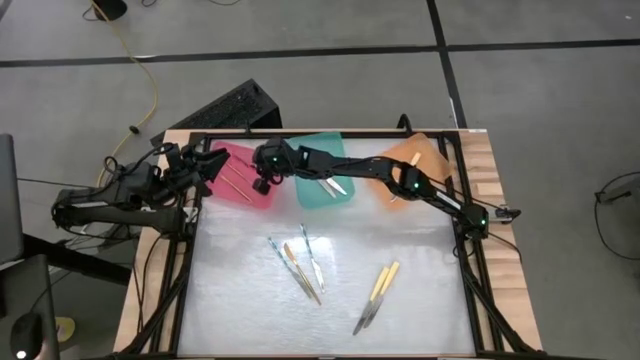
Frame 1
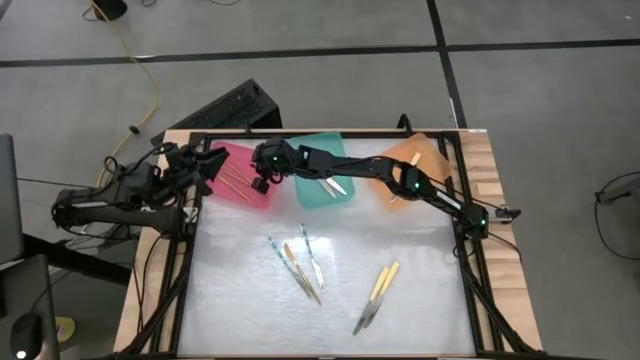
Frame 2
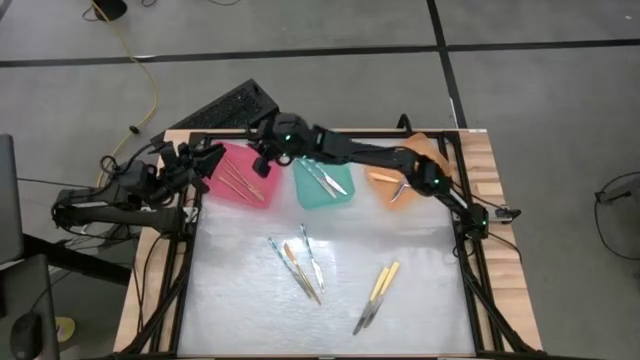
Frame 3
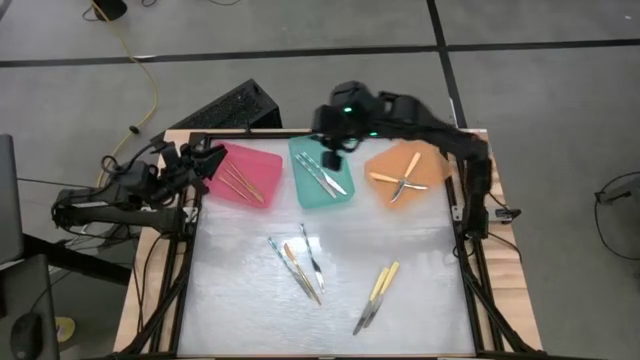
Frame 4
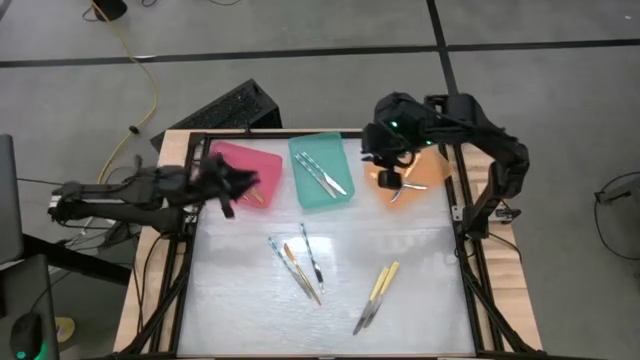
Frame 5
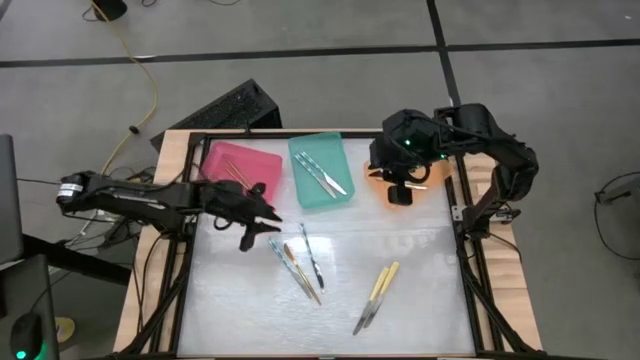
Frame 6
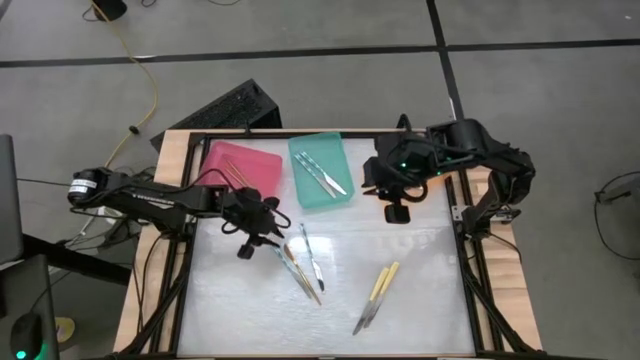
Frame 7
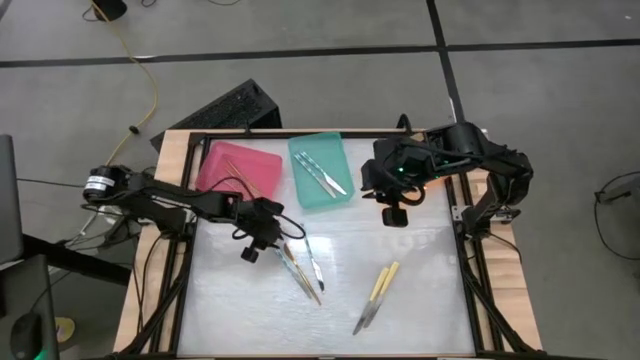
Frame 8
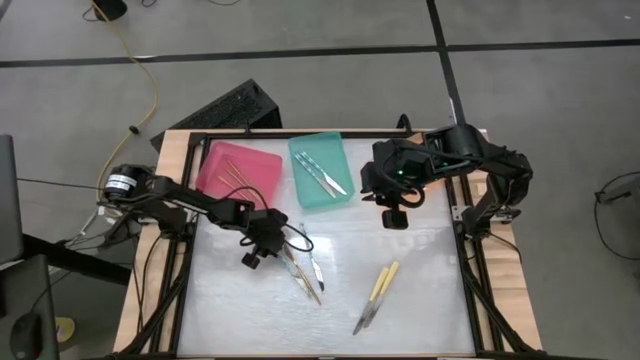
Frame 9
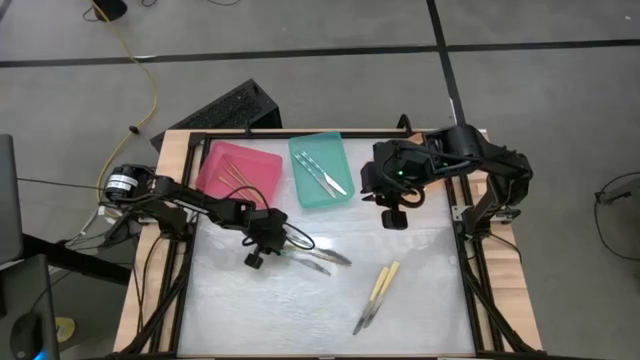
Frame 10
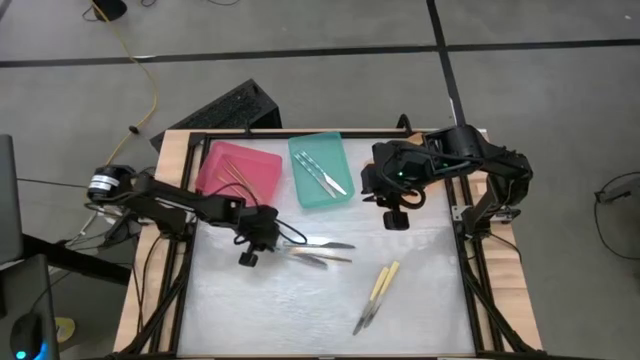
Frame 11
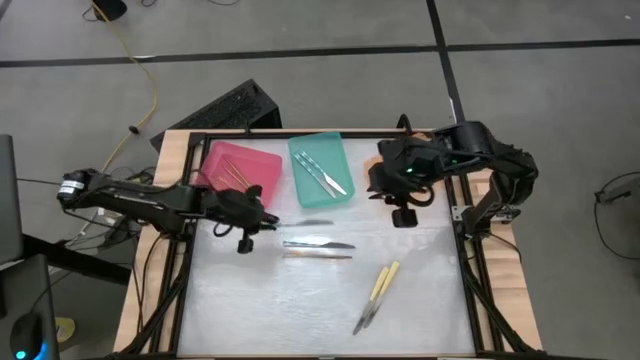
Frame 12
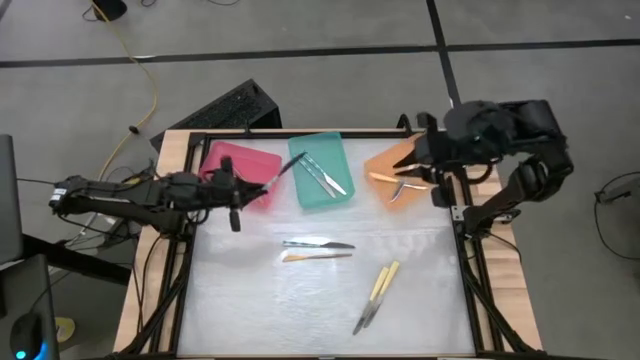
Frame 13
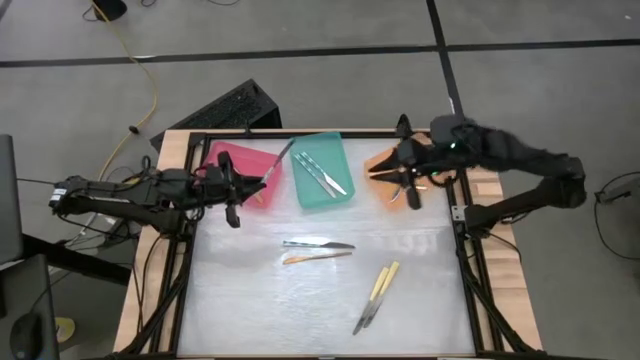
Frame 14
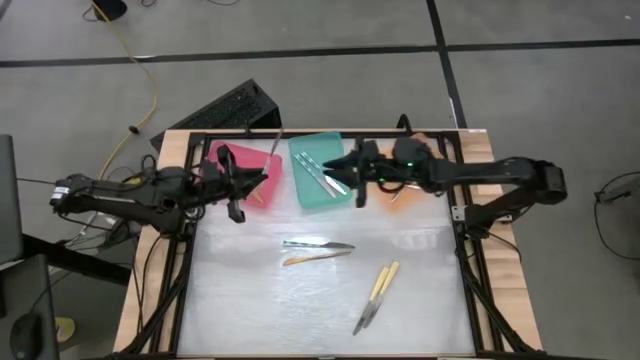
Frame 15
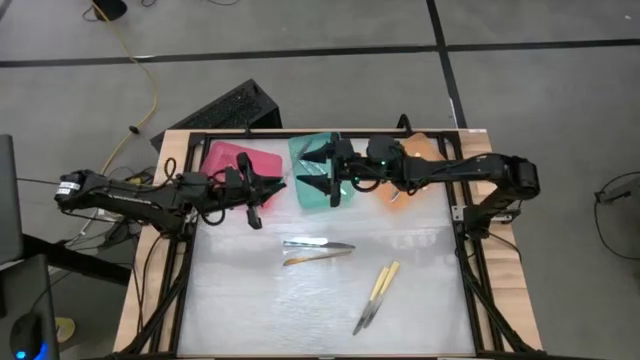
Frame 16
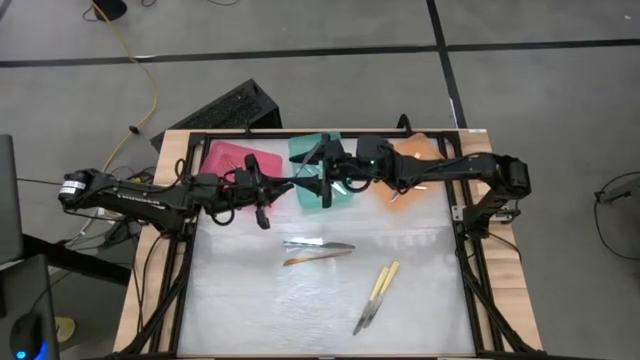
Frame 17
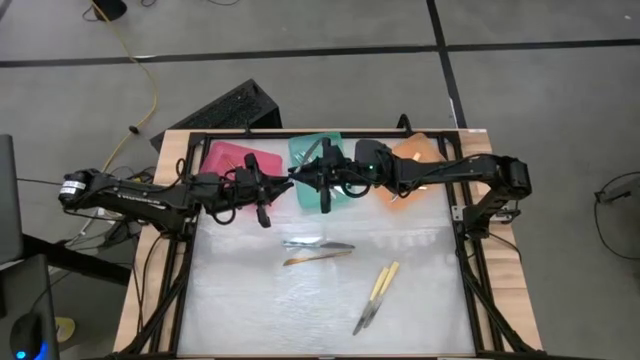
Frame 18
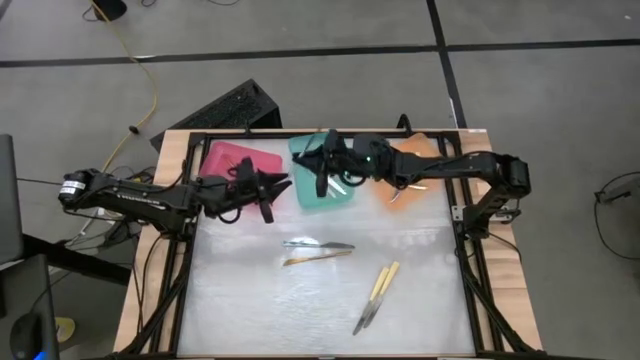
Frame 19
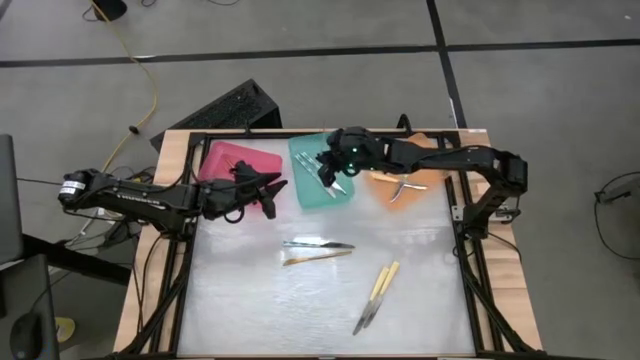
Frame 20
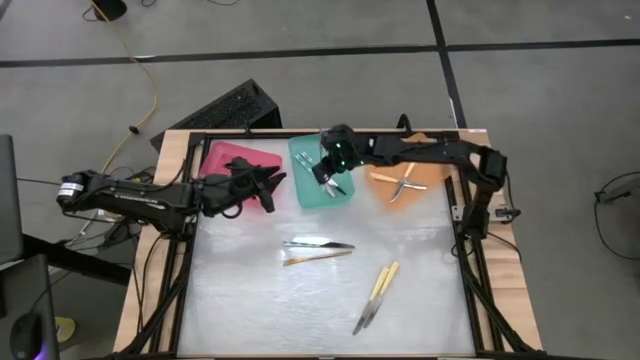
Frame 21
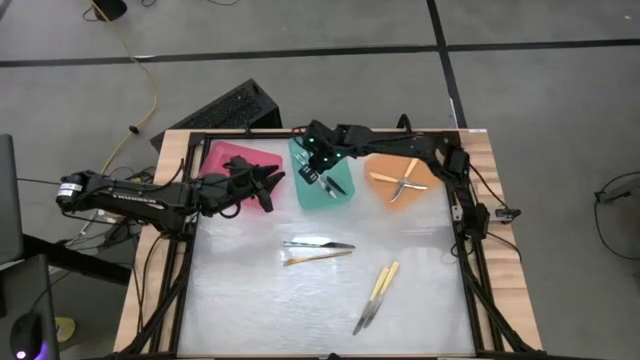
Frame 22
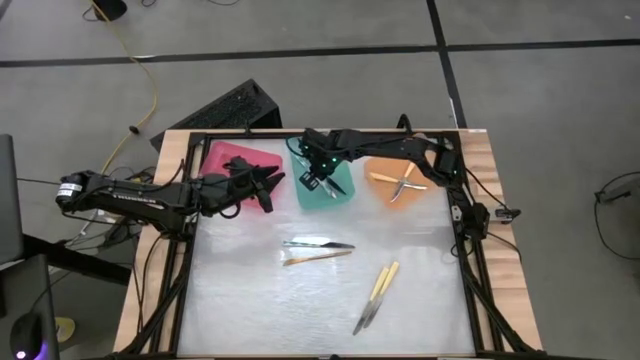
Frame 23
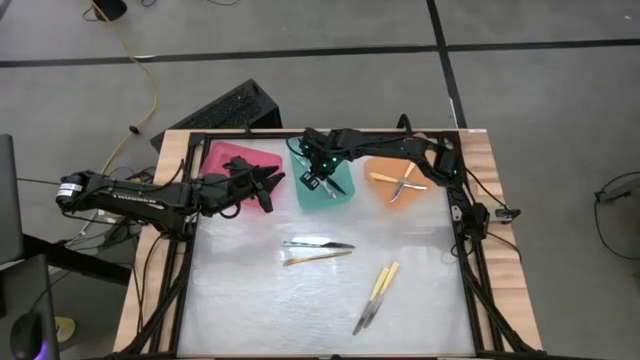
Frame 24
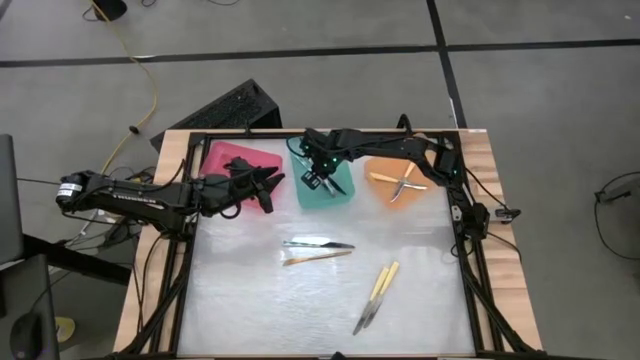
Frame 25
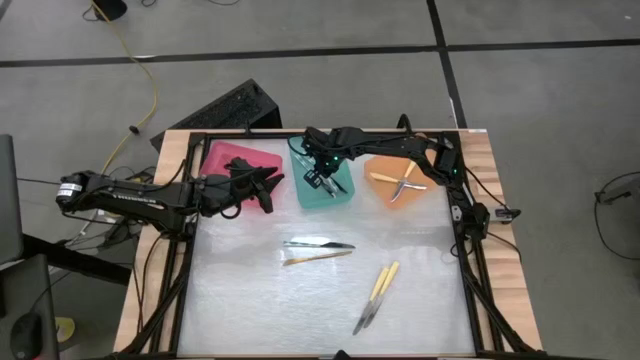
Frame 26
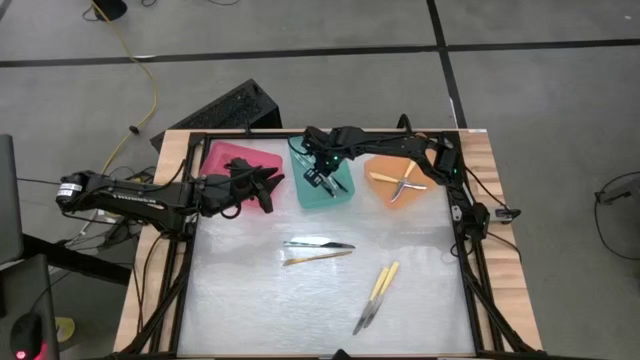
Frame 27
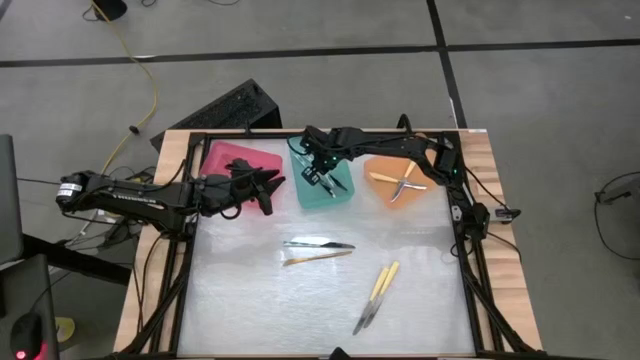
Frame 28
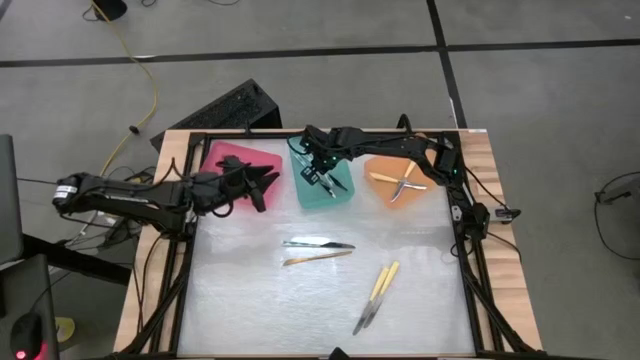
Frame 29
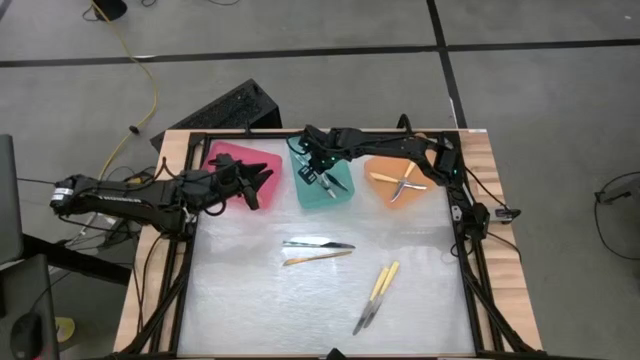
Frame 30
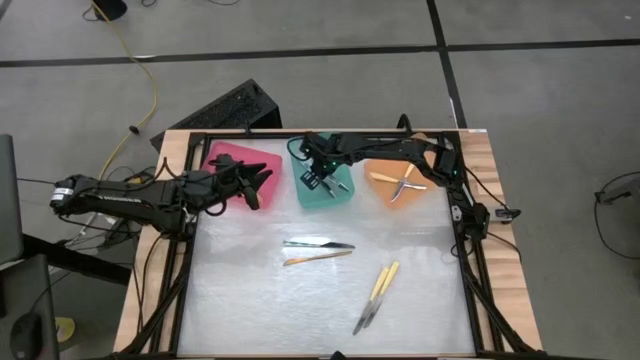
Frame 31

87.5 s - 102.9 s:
Task: Sort silverware by color (type)
Put the white and blue knife into the green bin

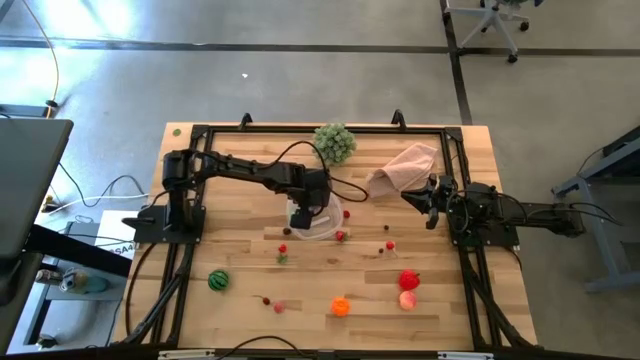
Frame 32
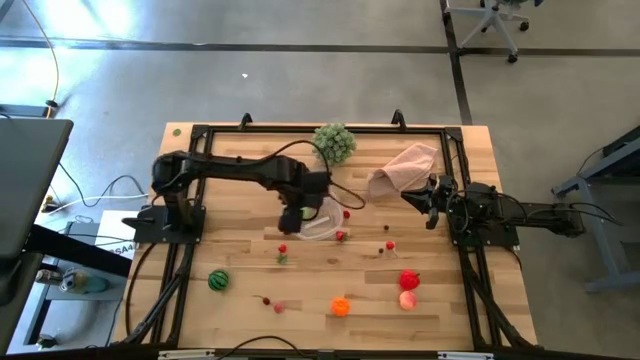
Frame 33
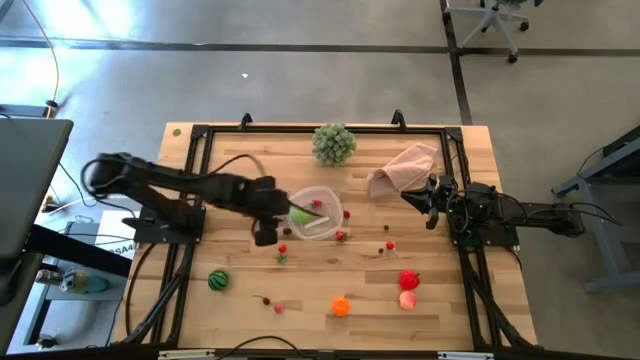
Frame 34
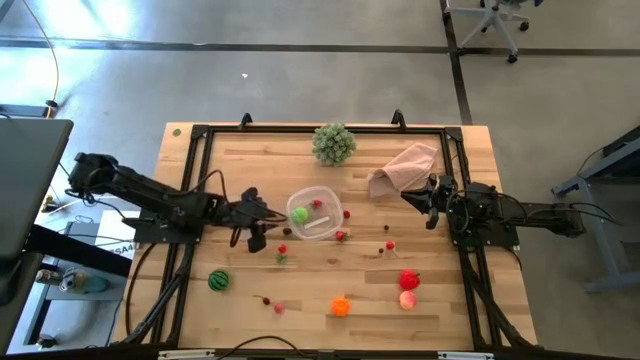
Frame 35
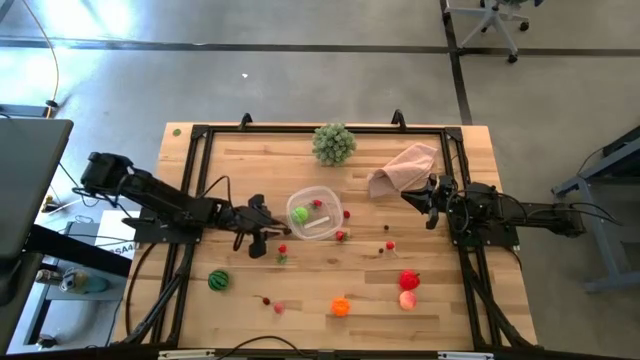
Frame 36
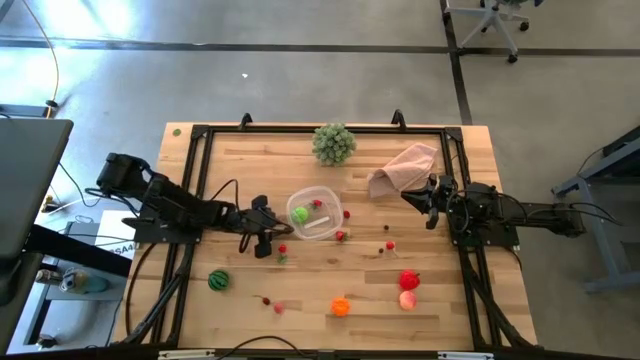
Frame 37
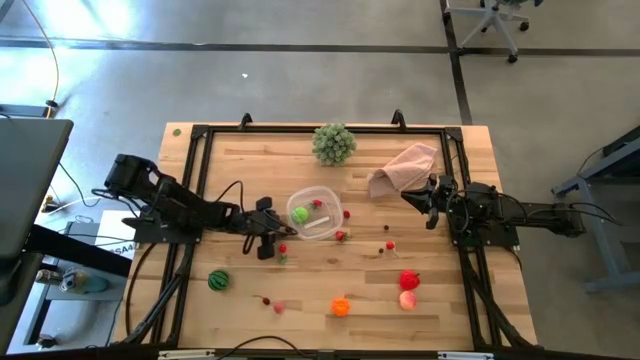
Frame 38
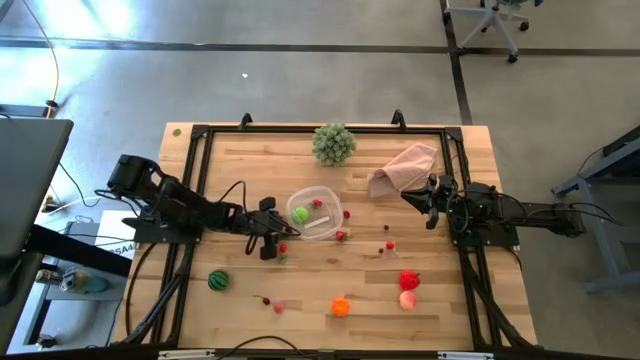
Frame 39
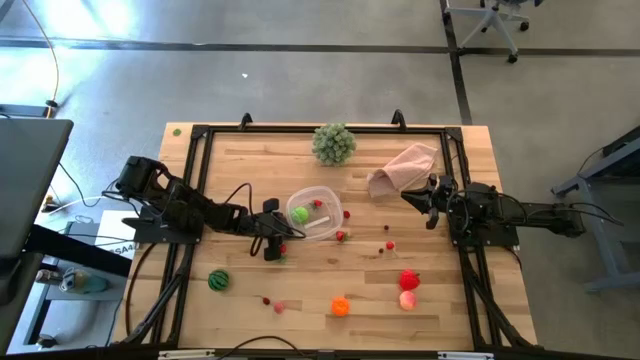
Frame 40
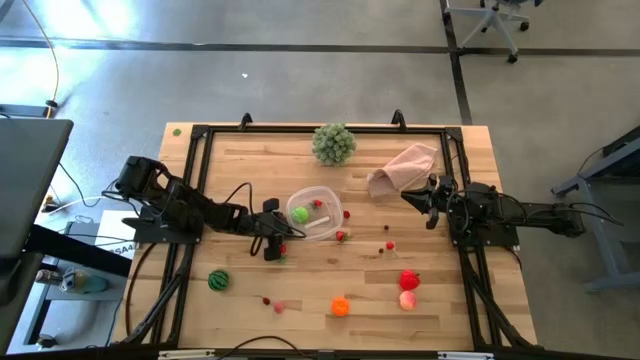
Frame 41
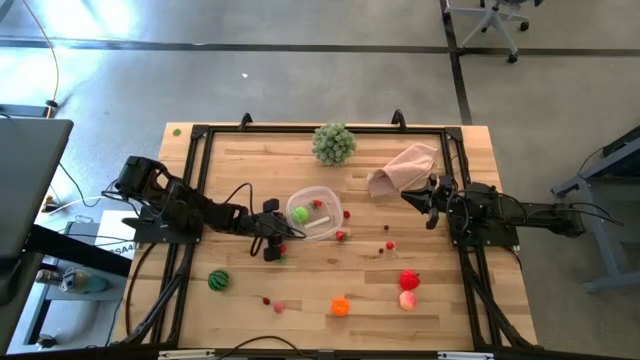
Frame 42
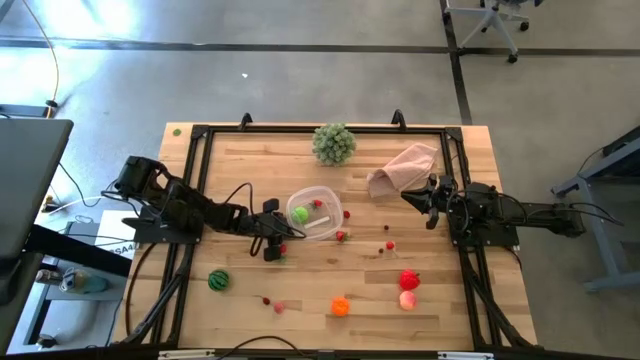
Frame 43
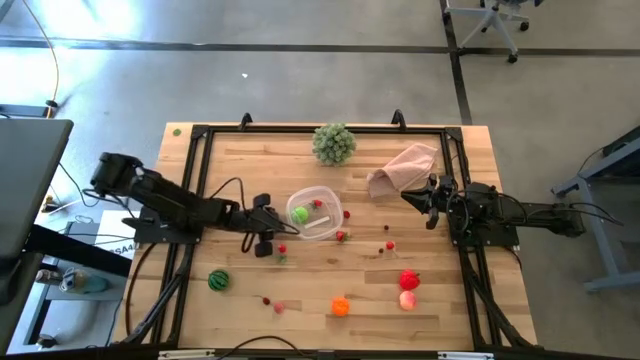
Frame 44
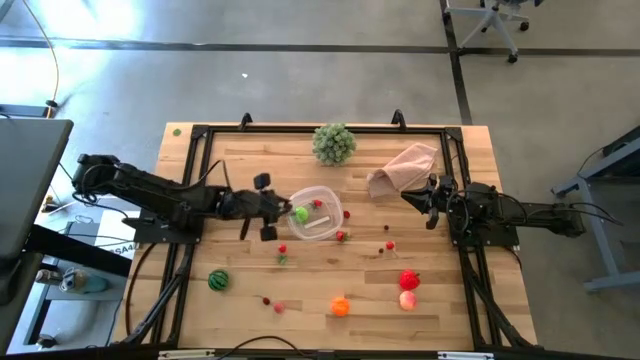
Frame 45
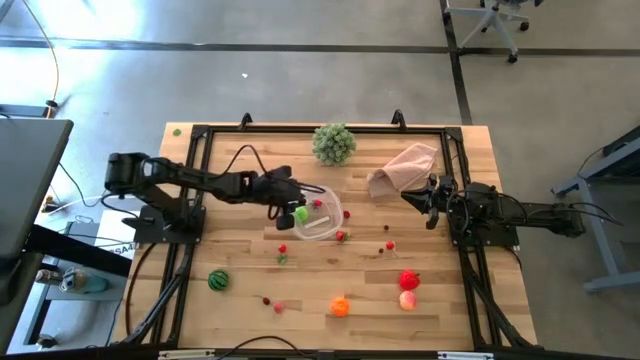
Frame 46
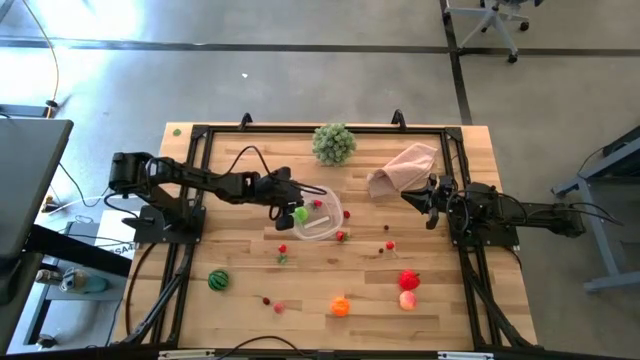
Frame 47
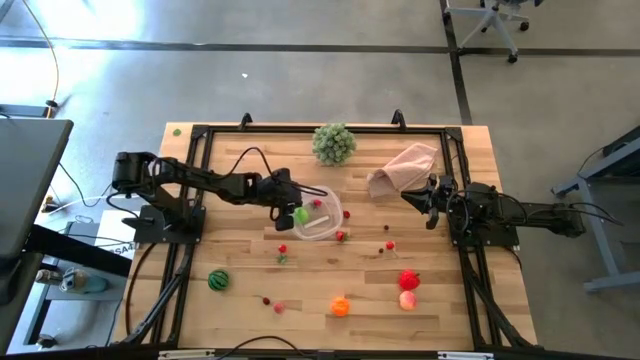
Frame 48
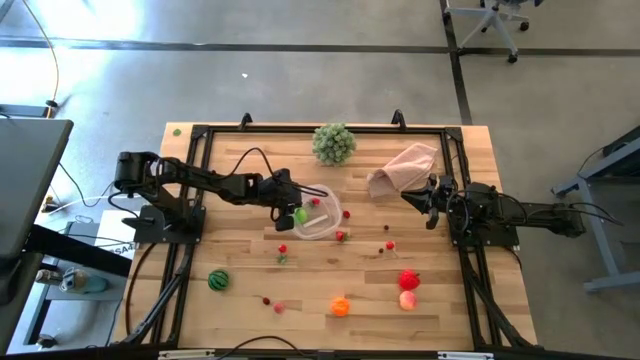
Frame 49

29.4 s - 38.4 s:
Task: Pick and placing Produce into tupperware
Put the blackberry into the transparent bin
